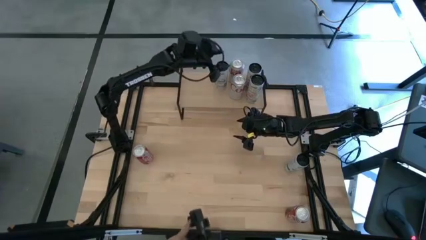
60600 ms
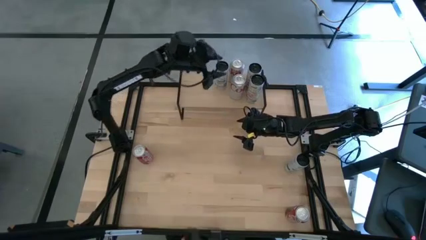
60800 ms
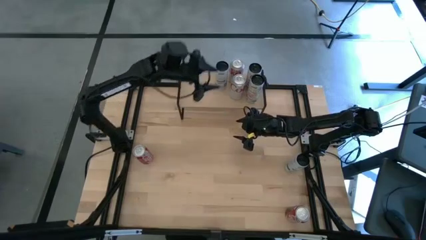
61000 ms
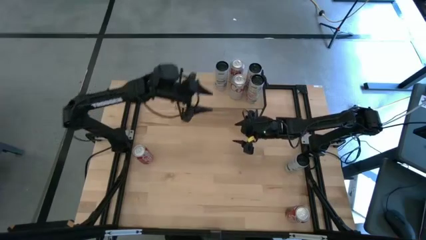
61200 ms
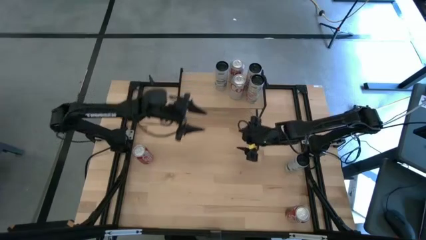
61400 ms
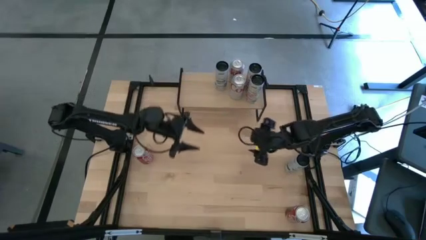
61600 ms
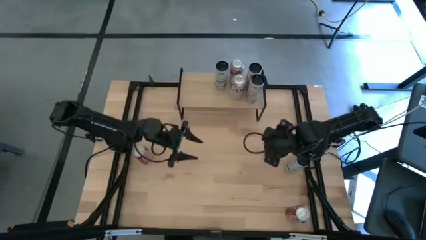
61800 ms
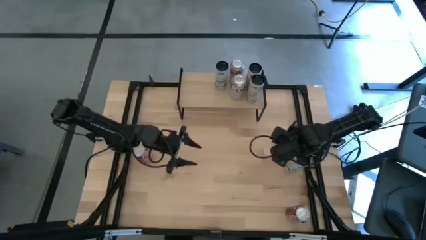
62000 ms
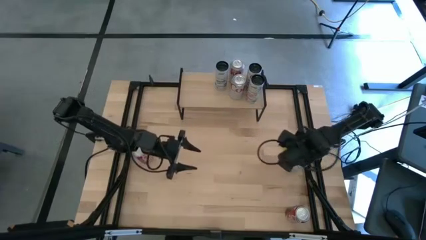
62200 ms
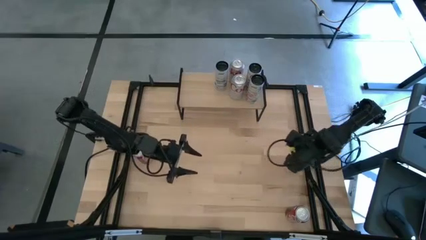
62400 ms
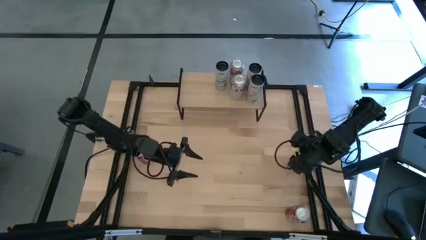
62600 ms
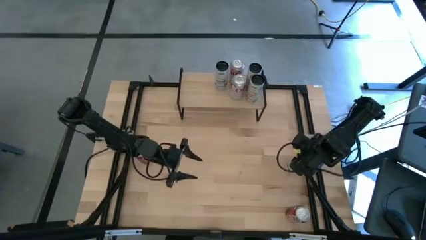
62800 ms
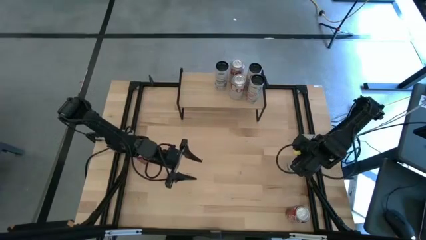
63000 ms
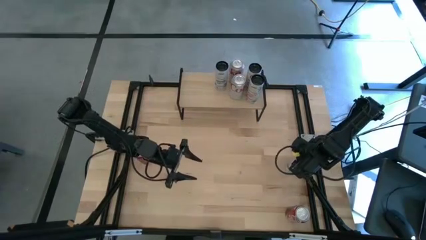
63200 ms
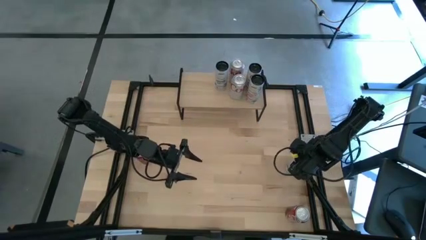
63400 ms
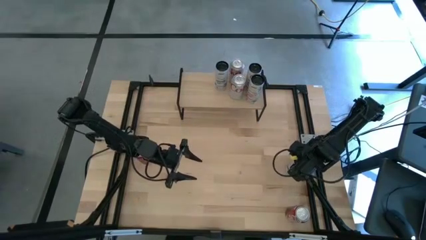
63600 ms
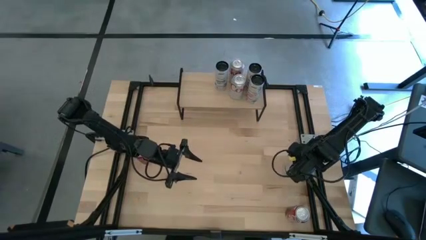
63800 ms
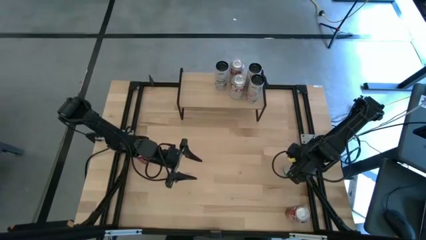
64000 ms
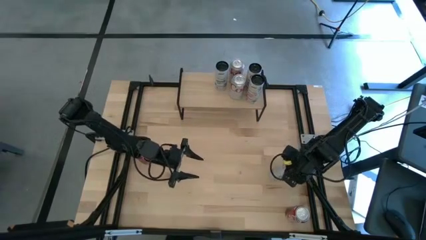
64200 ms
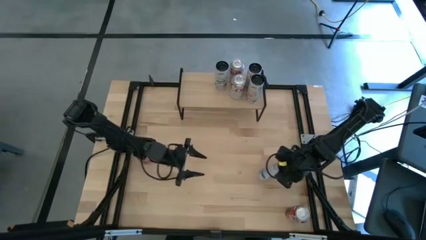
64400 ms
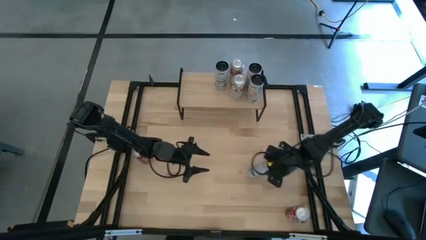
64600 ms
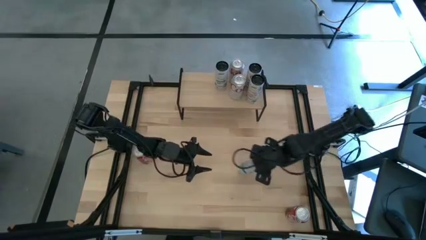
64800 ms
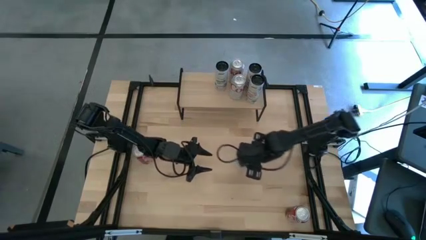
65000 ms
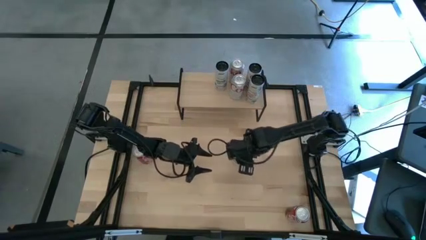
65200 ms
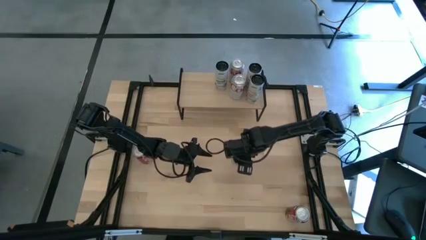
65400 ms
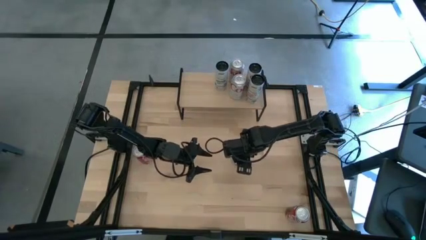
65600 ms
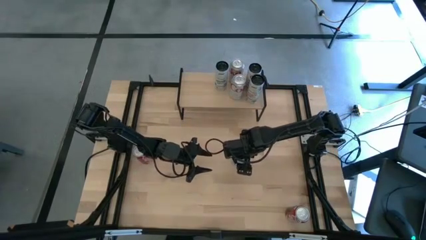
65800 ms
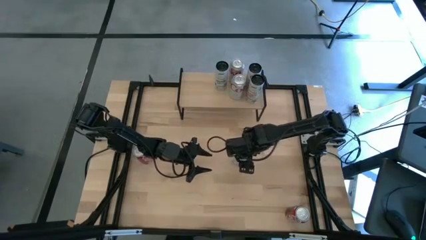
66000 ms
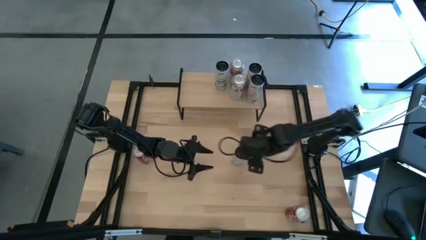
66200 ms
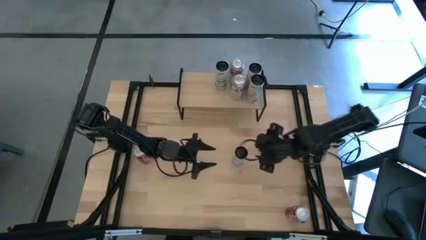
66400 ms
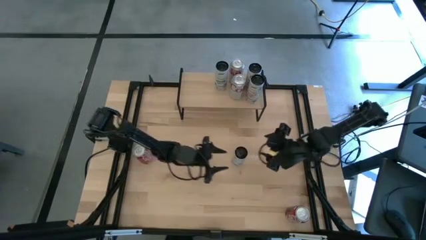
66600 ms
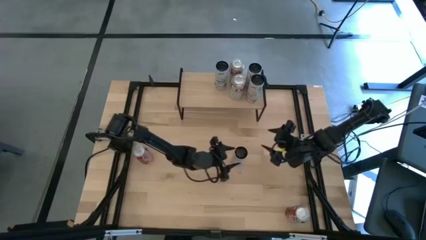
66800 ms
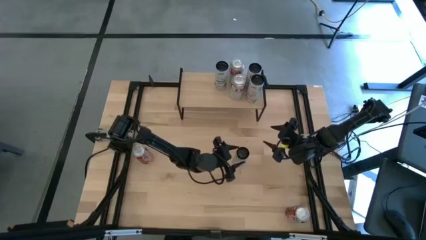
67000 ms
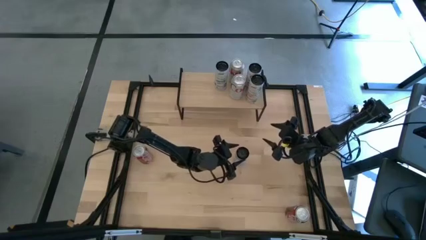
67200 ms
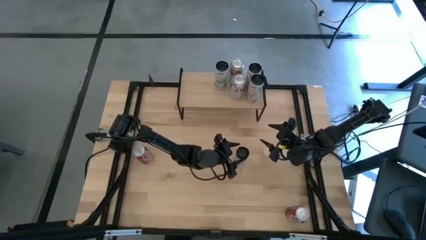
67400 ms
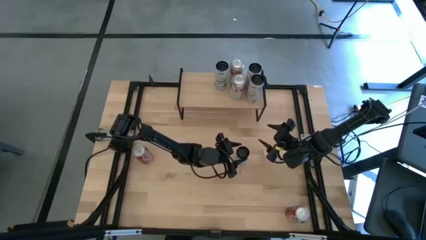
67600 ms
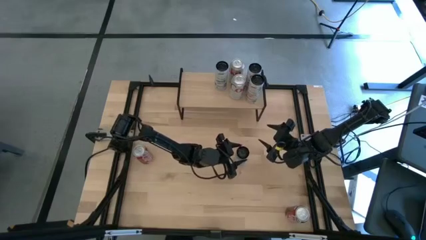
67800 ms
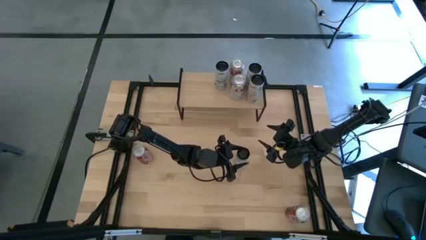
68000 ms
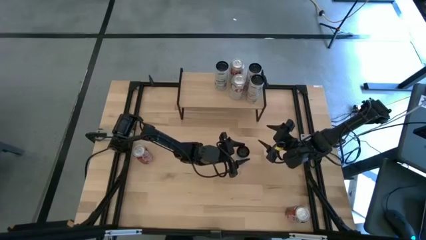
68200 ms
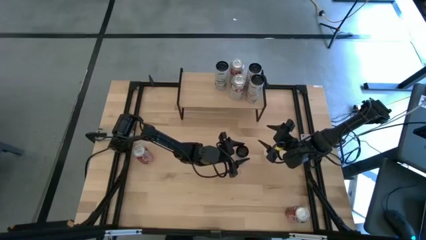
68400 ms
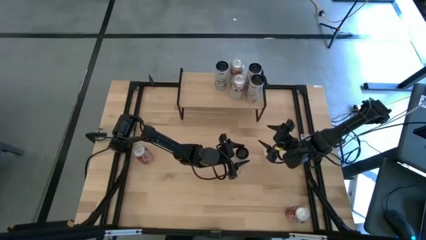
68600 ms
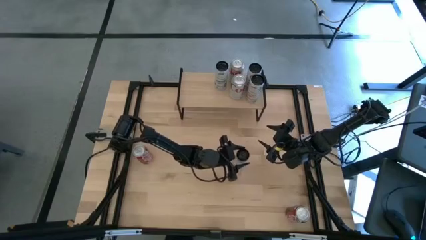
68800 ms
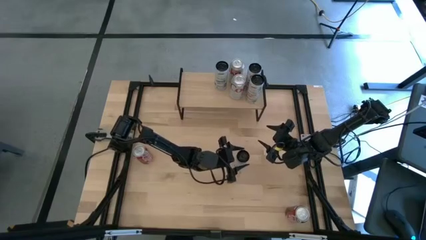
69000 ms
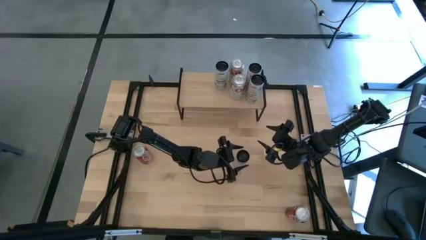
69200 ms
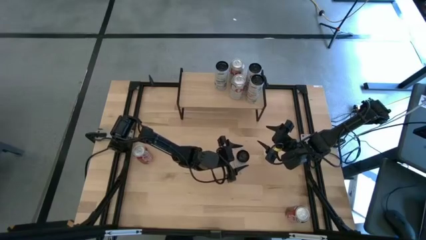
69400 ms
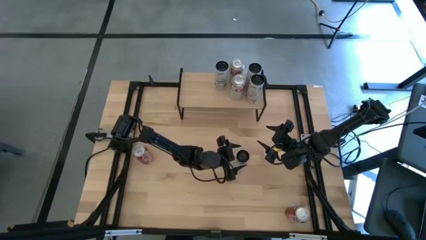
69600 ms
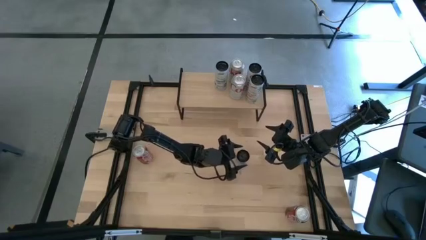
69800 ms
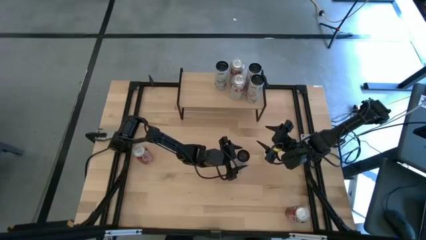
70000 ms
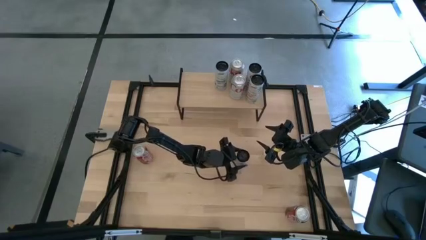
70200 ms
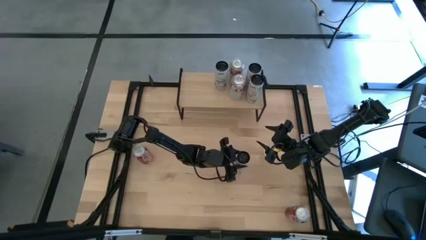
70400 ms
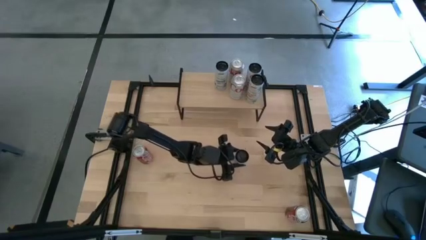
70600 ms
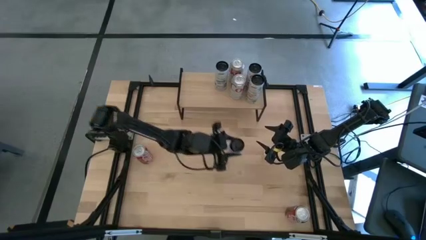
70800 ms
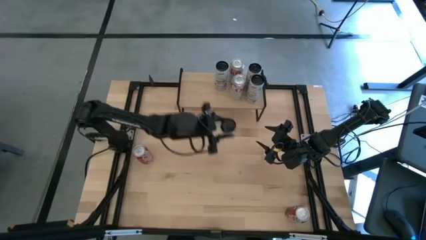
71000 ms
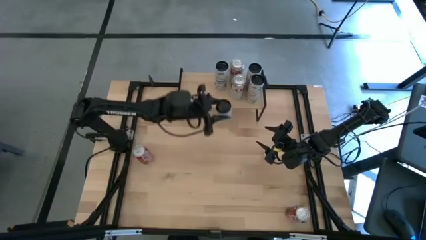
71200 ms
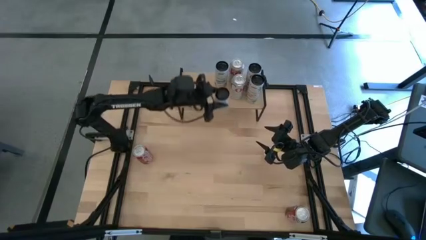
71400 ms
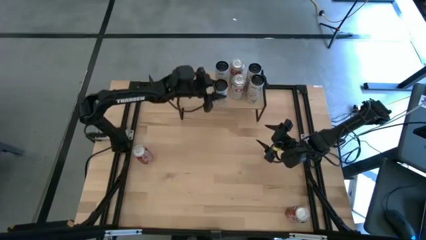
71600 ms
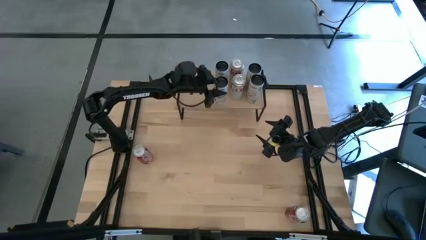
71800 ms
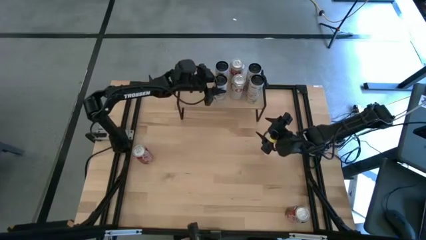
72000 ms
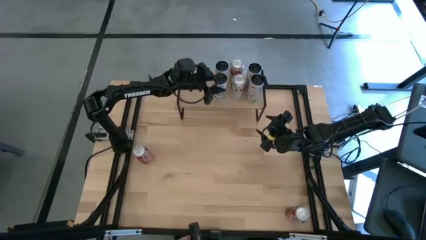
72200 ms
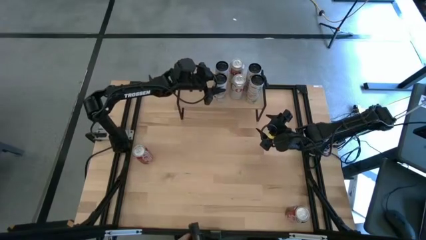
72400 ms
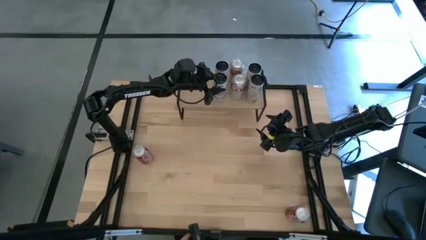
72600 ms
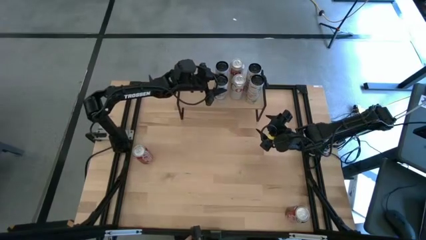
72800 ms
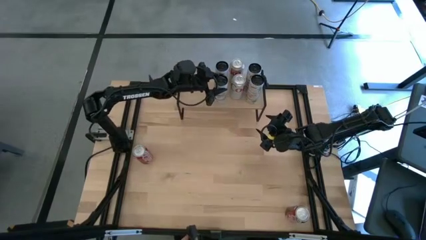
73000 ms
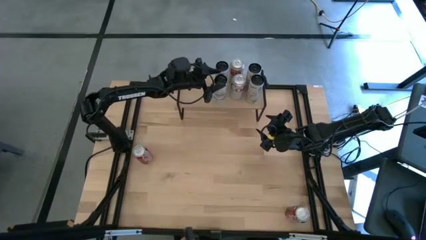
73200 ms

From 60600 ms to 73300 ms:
Task: Place canned beverage on shelf
Put the white-blue soda can on the shelf aligned with the other white-blue soda can

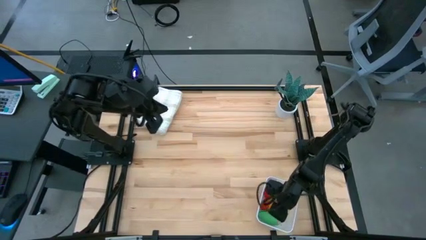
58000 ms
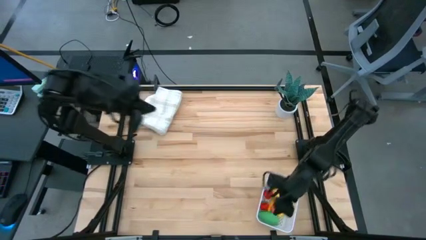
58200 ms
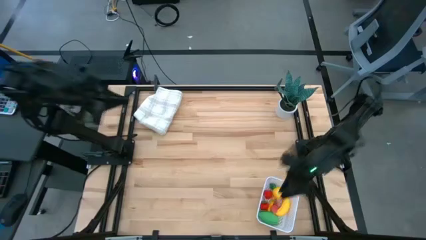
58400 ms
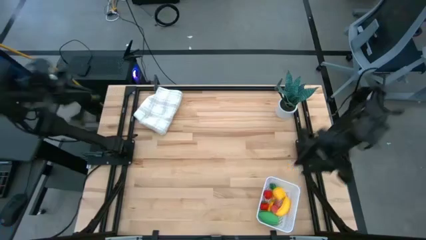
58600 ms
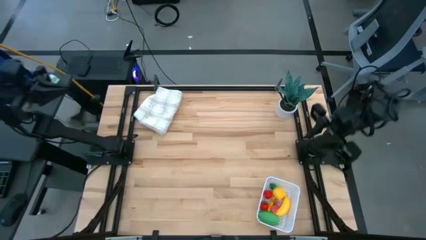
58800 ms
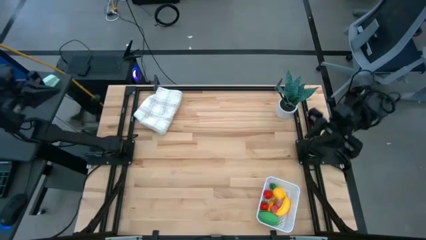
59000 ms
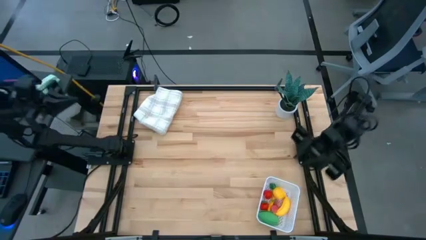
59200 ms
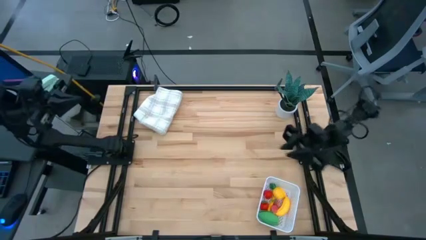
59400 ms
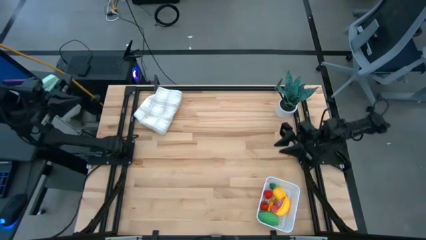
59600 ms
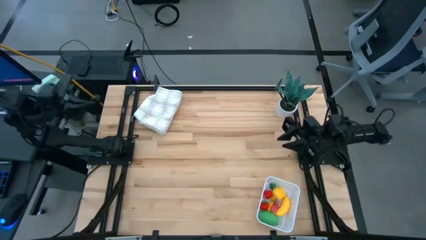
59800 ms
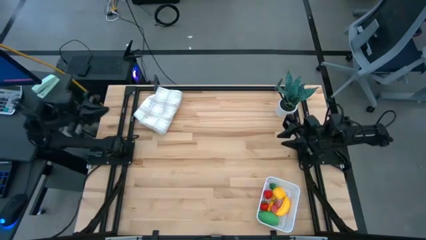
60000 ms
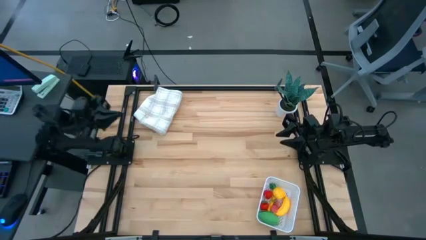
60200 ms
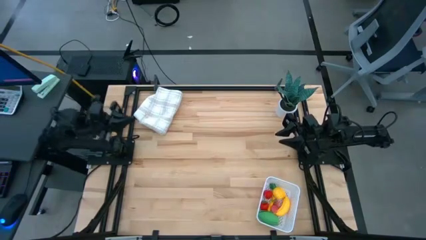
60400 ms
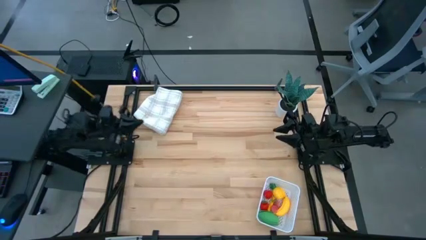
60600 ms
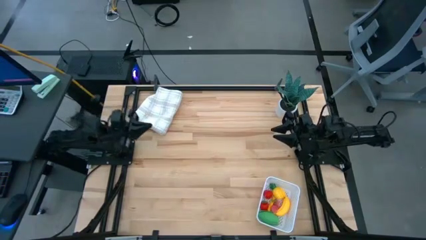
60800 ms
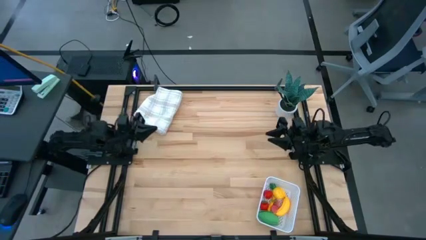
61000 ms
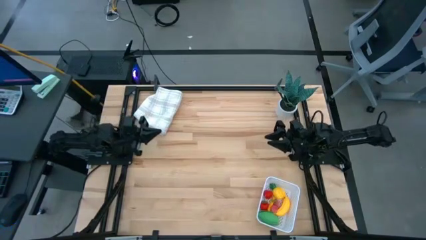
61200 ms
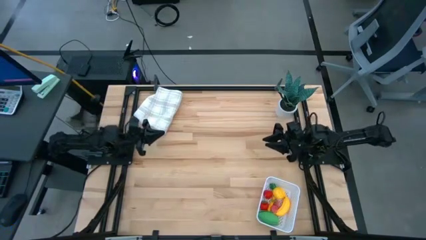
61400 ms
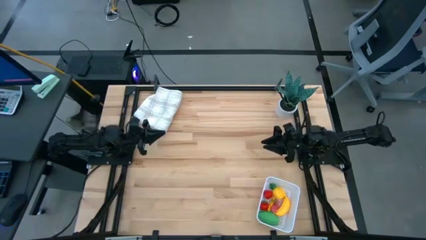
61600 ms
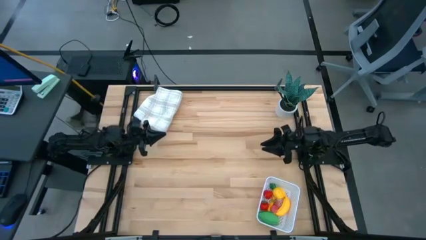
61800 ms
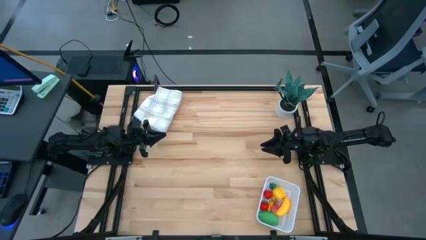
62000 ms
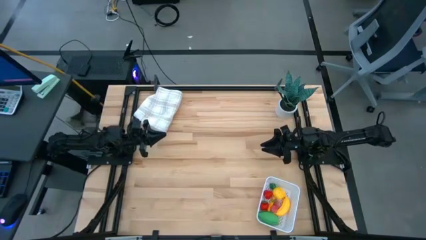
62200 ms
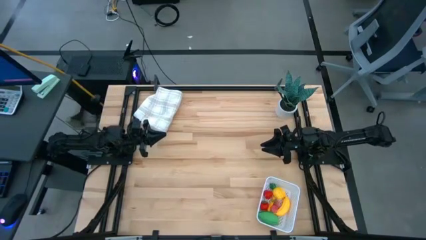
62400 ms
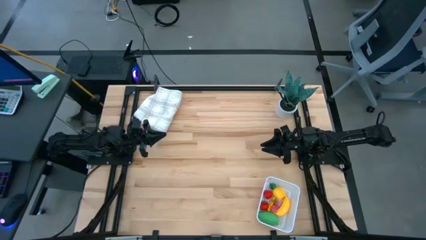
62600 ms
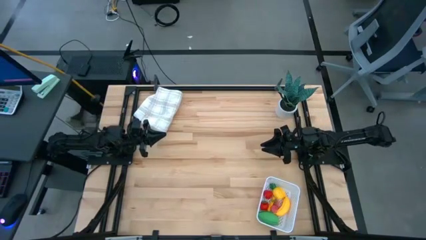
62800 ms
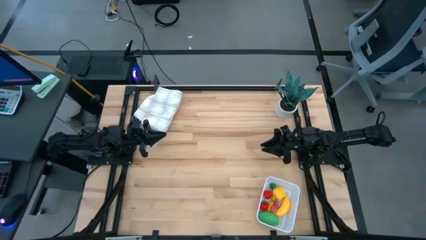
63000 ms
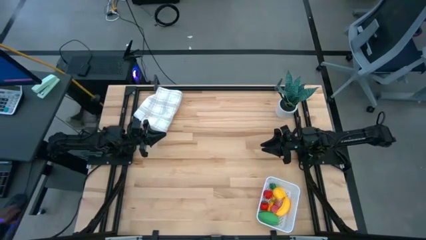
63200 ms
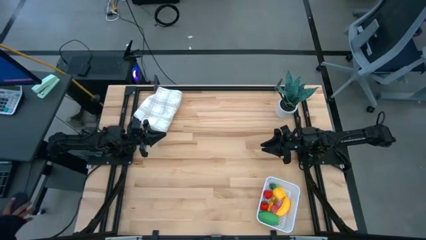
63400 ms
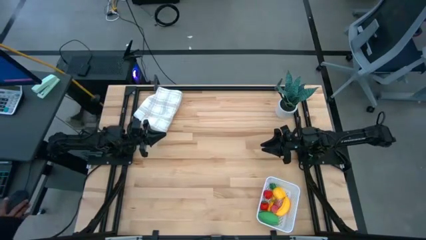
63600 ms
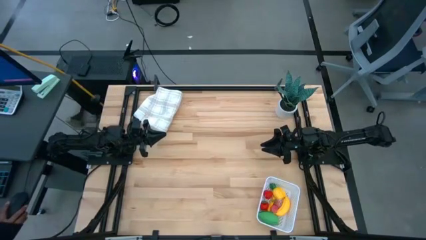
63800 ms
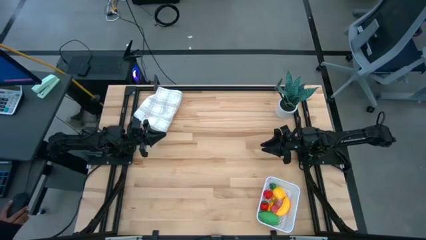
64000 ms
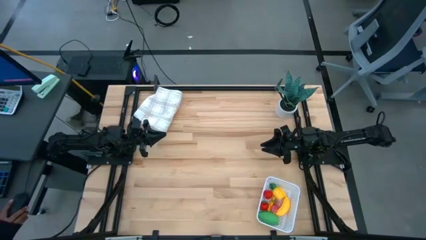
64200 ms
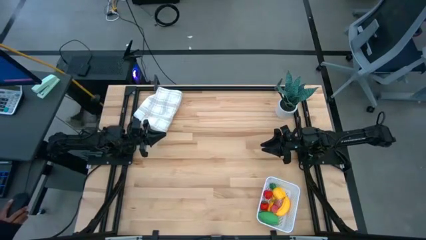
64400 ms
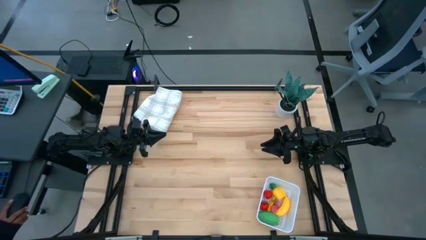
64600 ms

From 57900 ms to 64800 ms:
Task: Pick and placing Produce into tupperware
Return to Home Position
